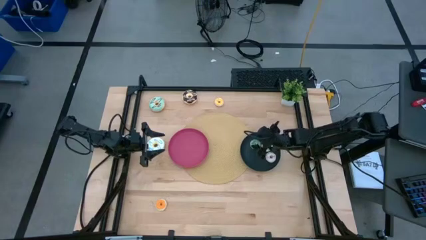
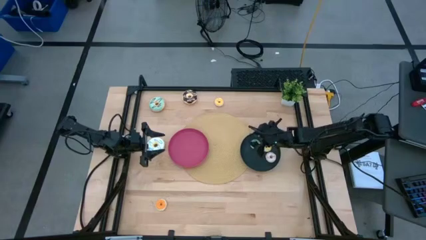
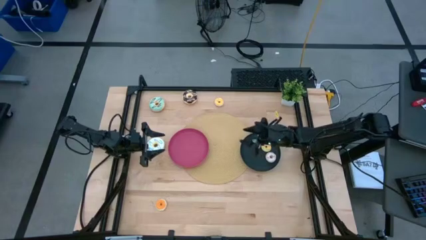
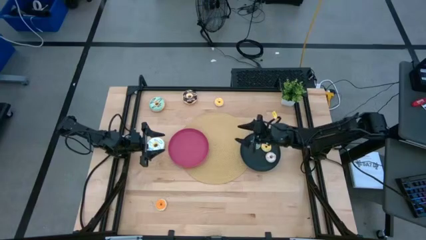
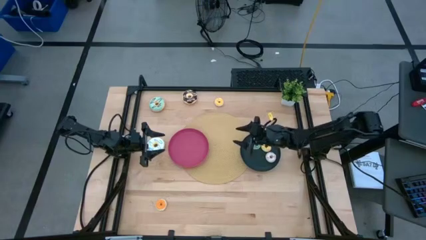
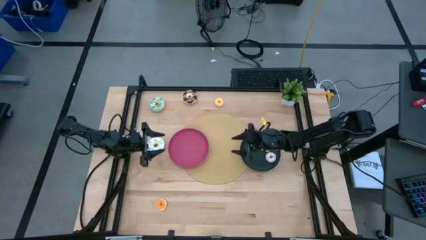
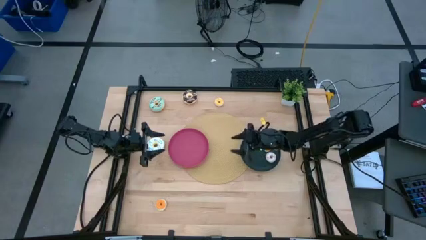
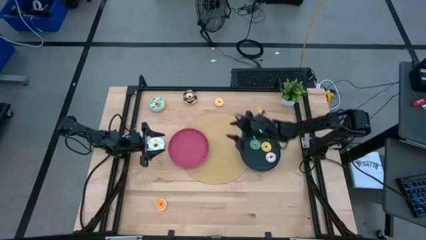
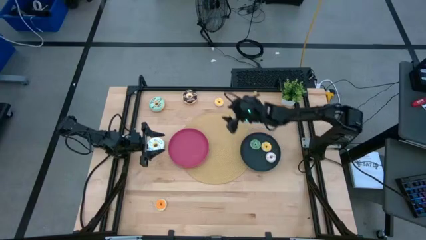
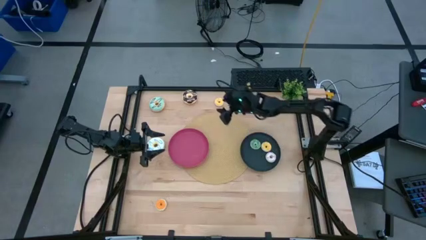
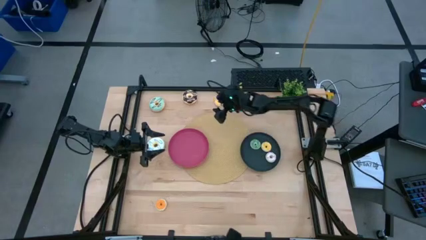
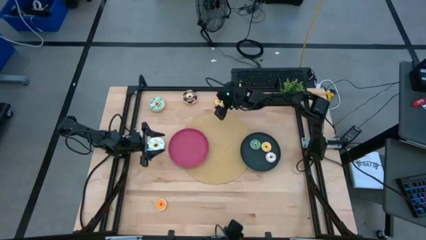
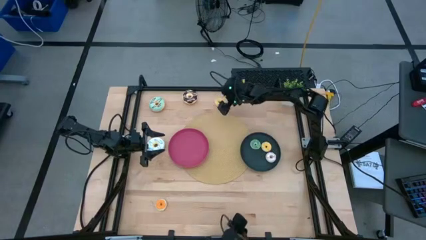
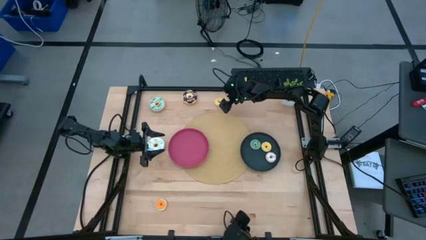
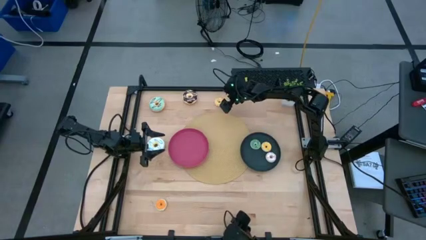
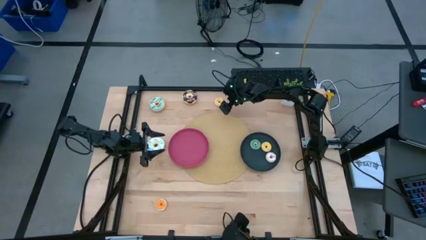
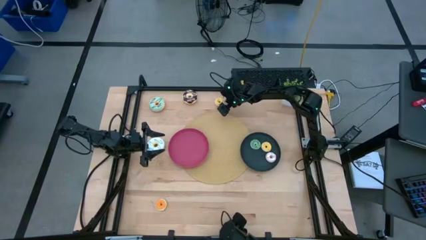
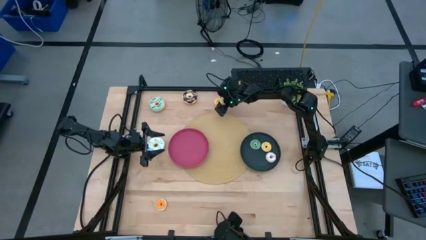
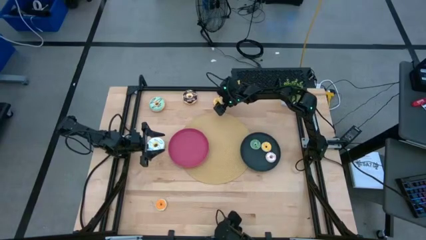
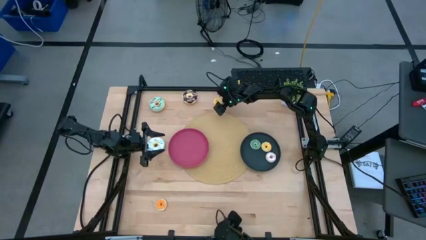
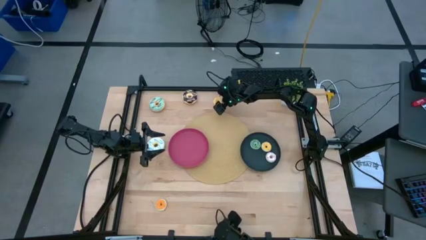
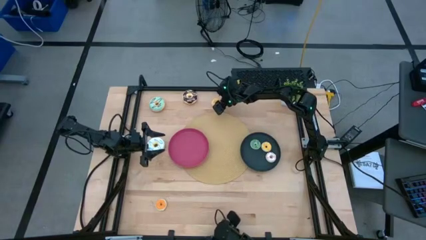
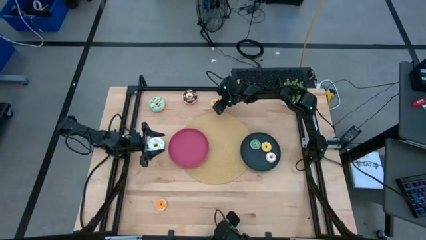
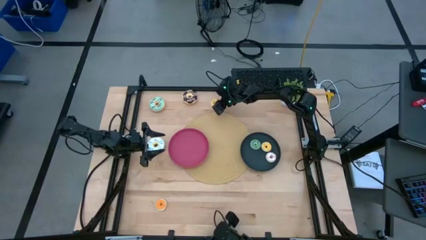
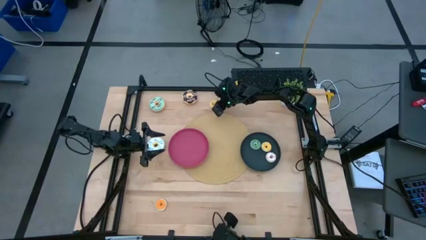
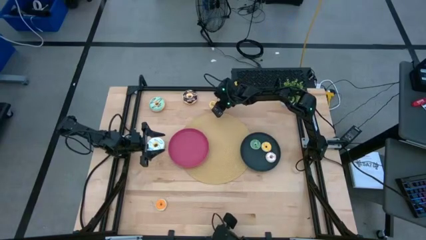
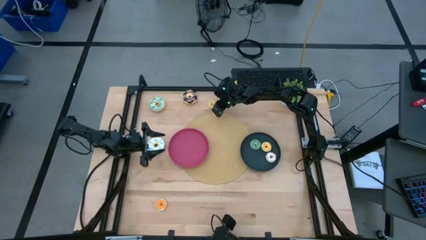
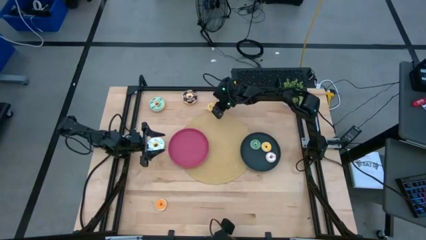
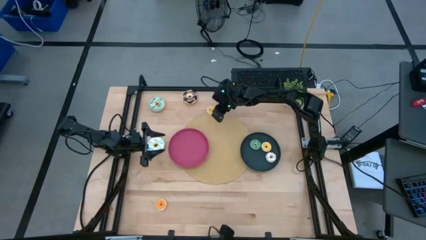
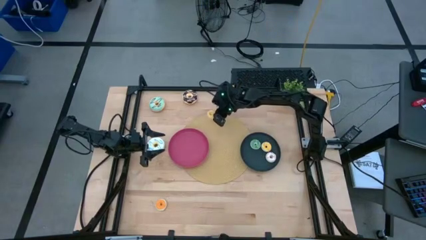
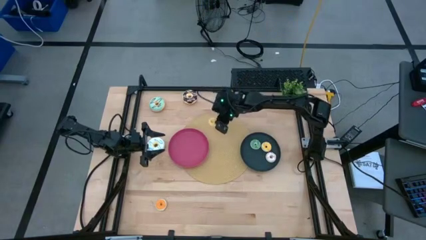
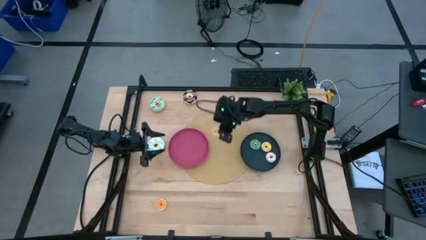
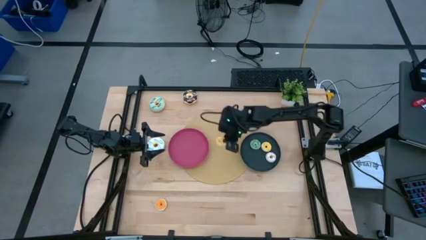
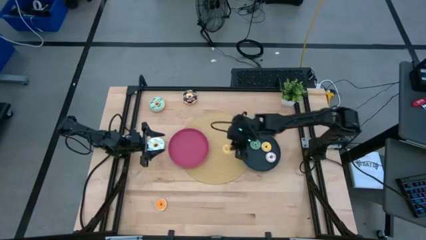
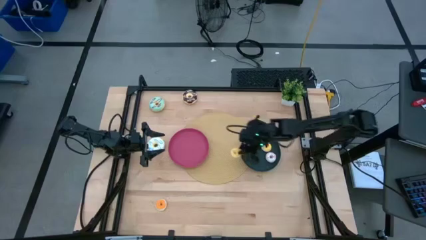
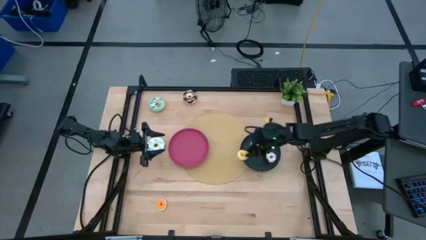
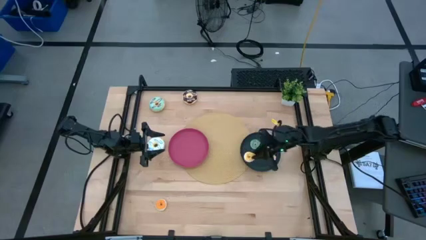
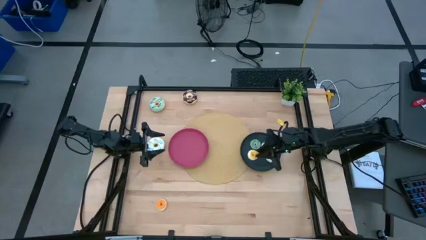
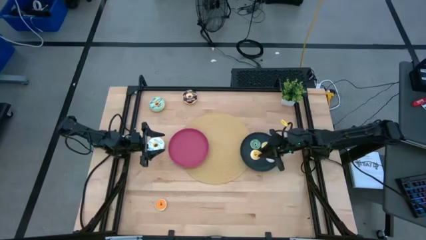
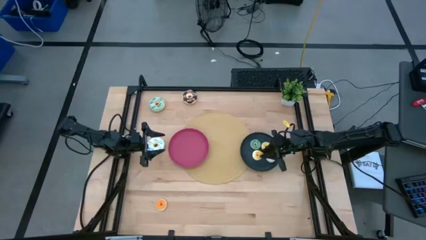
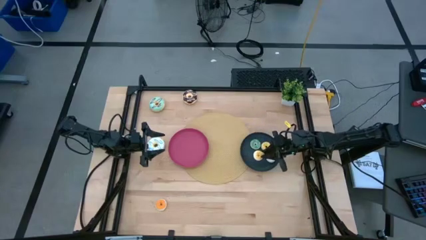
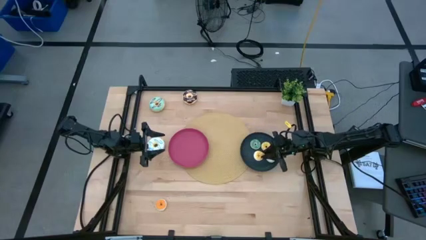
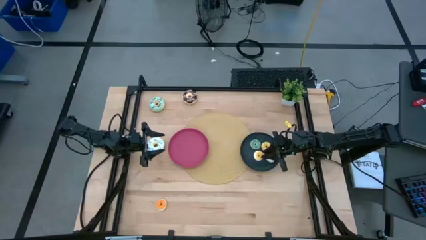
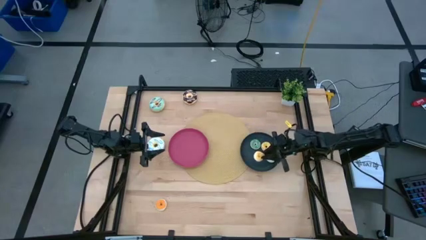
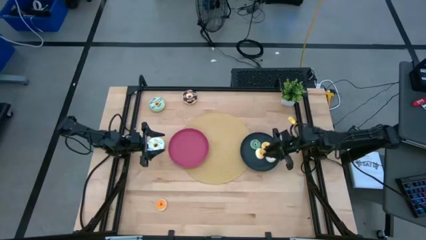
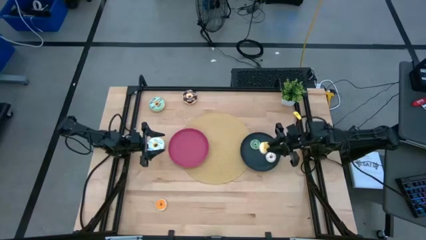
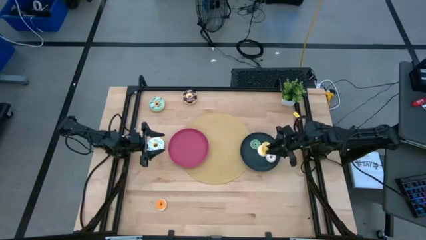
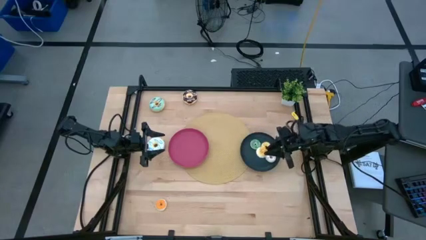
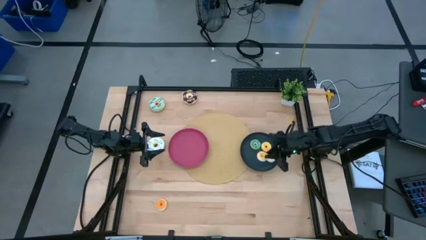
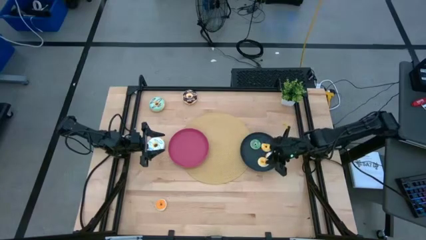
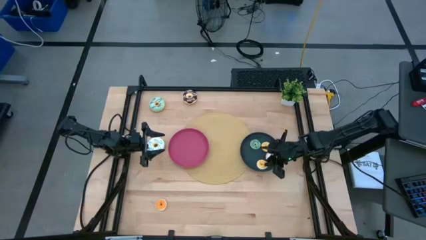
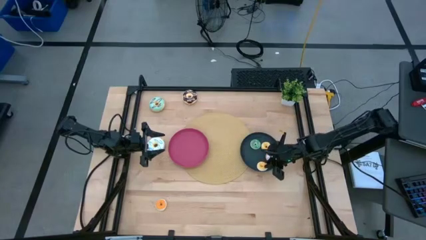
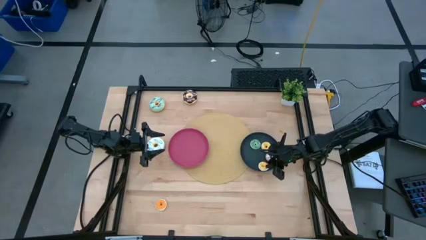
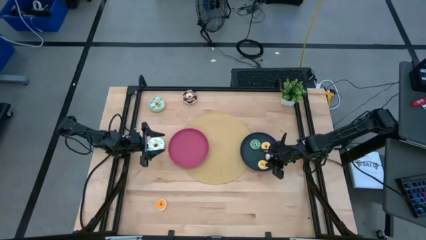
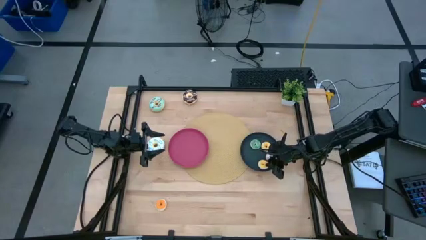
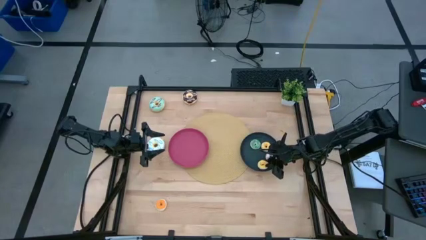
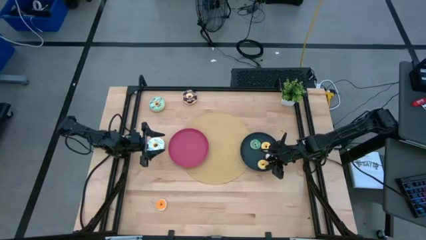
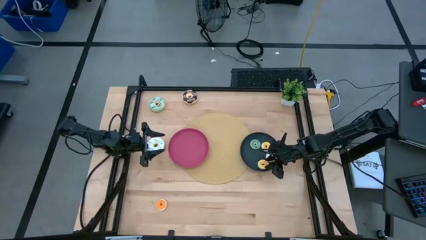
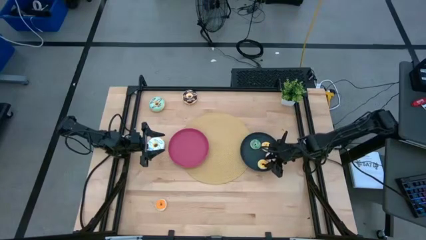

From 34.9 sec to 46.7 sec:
Task: Pick & Place donuts
Put the small yellow donut on the black plate
